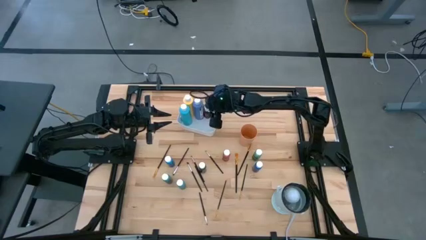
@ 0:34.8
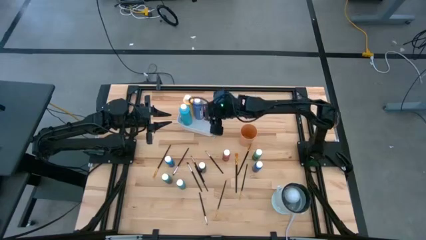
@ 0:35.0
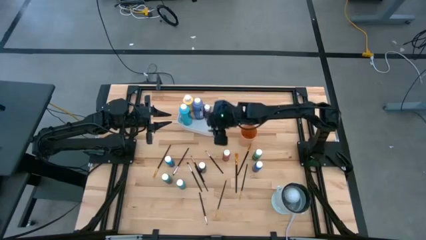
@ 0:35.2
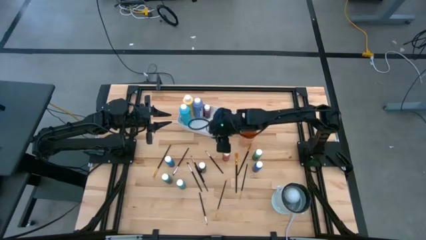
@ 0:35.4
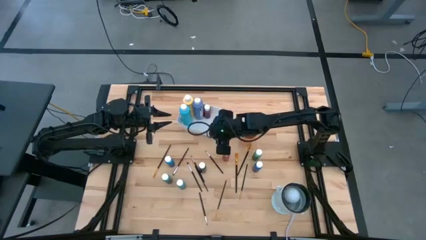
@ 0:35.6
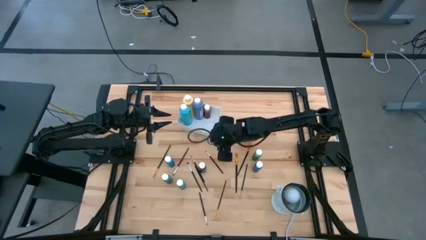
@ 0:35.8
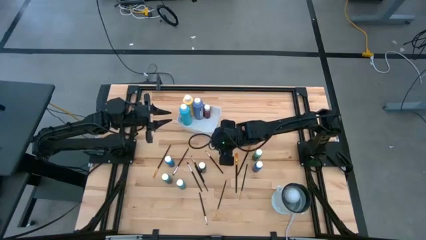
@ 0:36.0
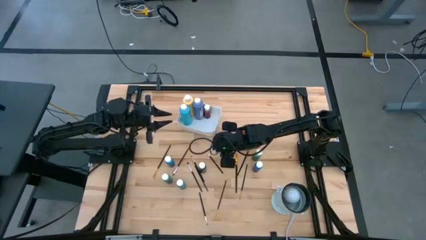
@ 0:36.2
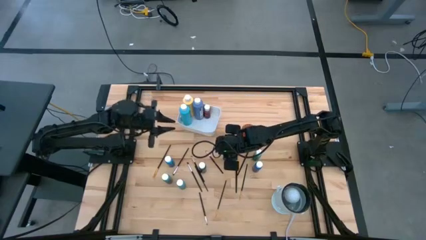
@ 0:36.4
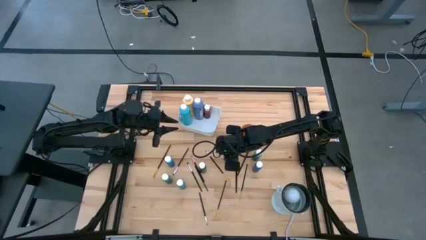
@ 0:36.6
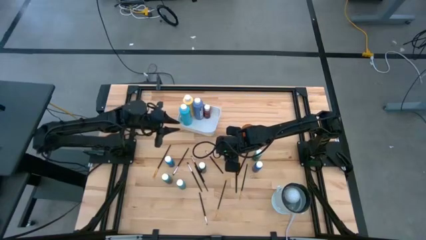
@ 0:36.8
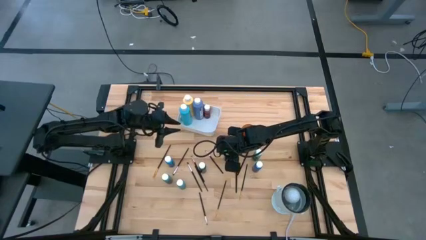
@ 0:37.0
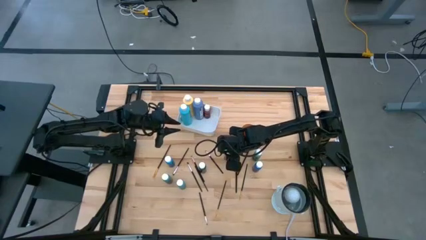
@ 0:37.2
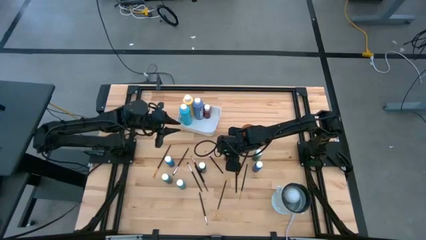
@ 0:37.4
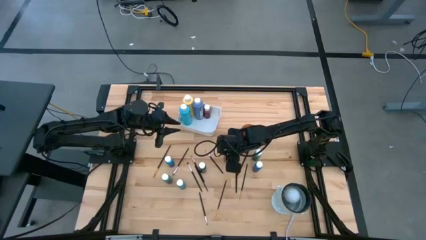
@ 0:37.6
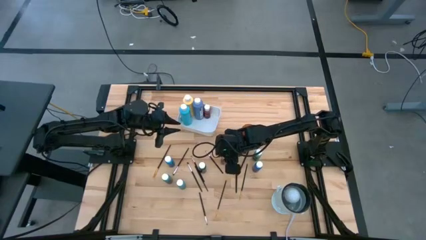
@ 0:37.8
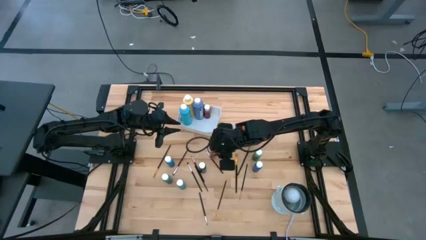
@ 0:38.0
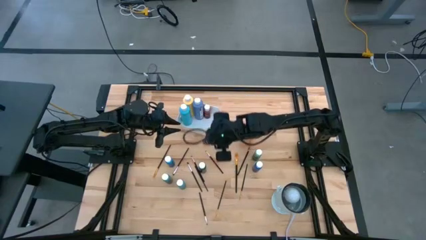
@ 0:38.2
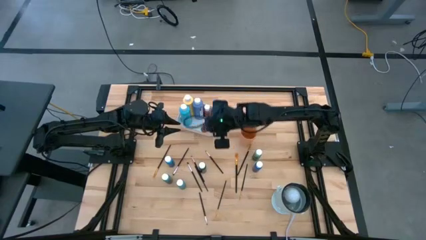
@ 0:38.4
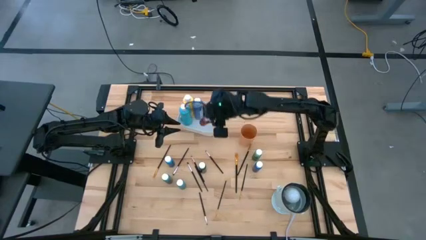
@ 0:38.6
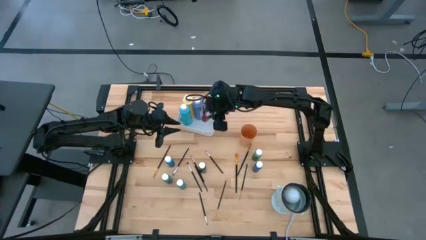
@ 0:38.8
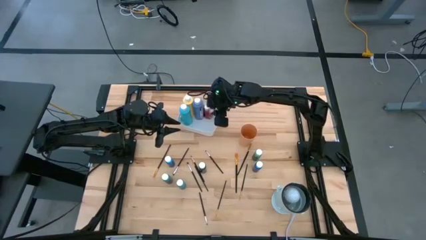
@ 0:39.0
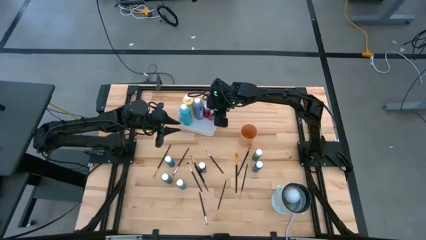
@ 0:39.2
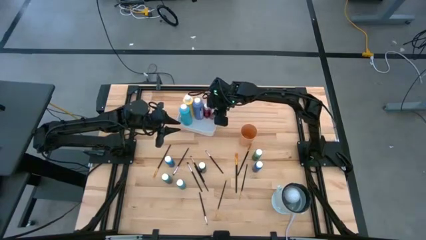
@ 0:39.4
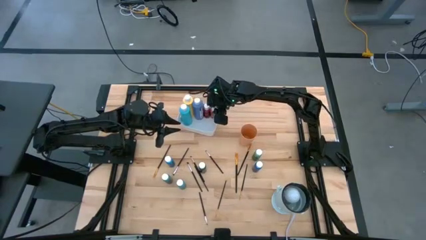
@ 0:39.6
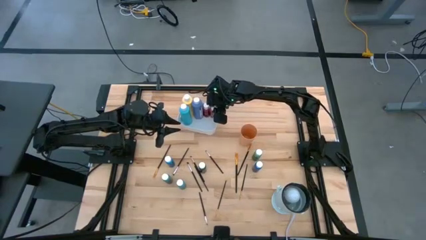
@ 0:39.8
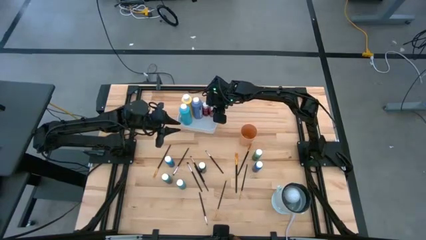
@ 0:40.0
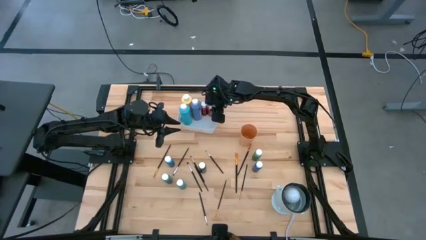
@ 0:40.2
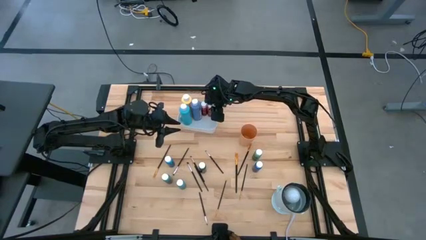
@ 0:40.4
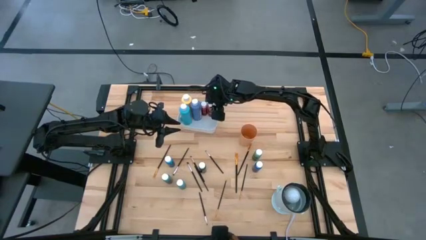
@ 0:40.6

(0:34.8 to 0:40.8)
Task: Pick & Place Paint Supplies
Put the small orange paint bottle into the bin

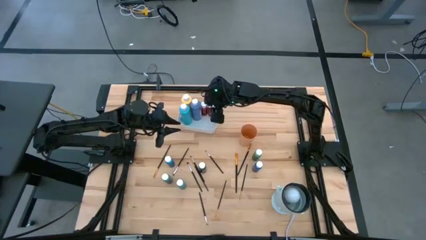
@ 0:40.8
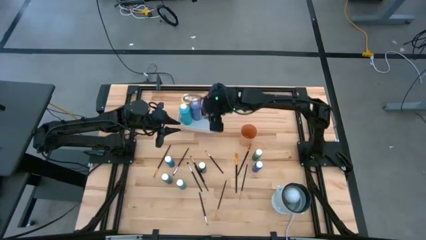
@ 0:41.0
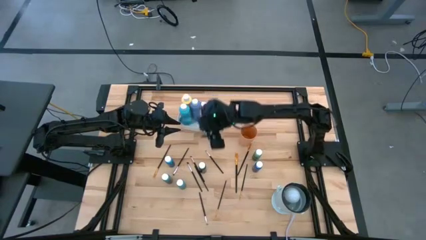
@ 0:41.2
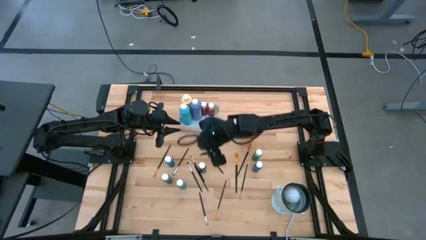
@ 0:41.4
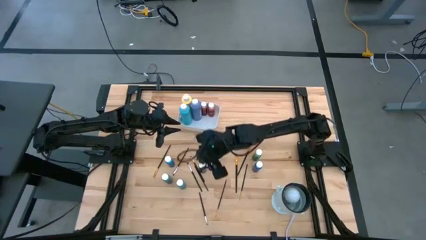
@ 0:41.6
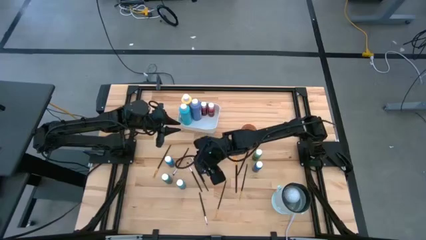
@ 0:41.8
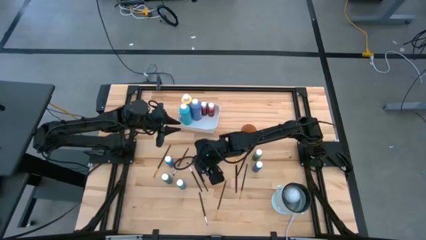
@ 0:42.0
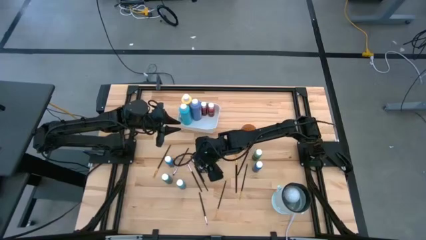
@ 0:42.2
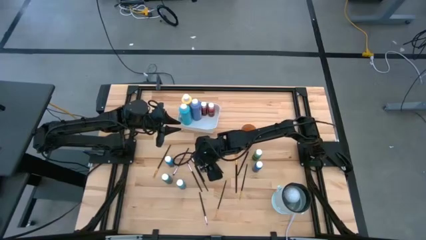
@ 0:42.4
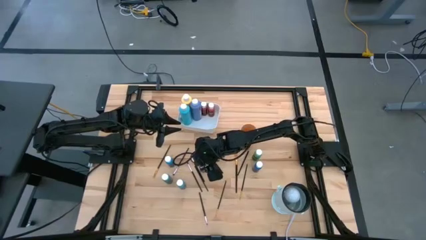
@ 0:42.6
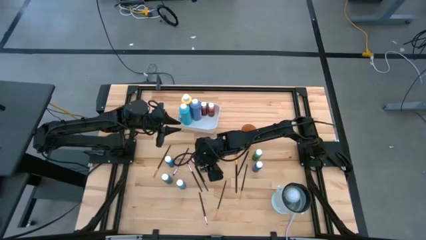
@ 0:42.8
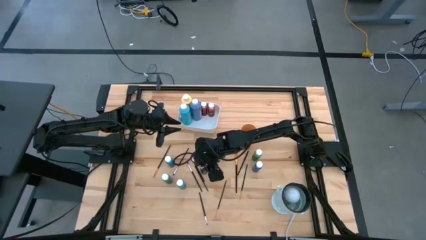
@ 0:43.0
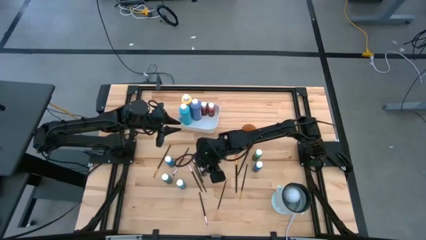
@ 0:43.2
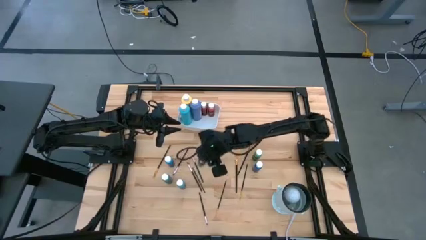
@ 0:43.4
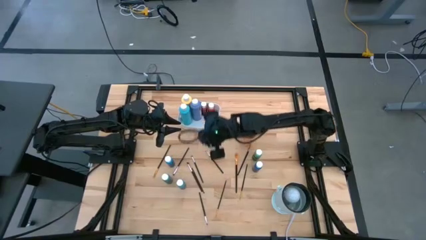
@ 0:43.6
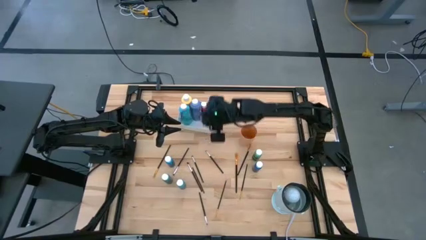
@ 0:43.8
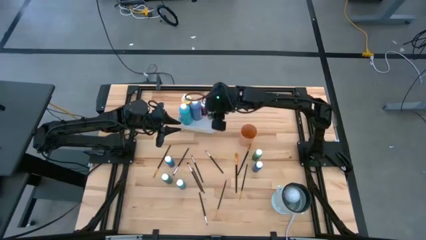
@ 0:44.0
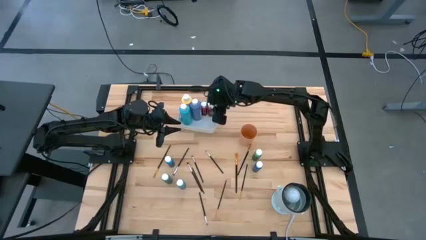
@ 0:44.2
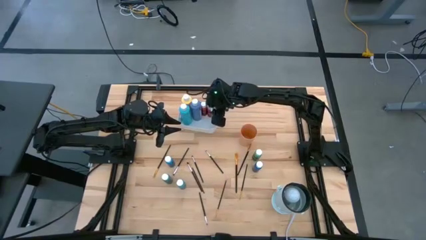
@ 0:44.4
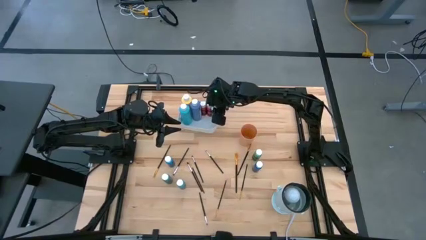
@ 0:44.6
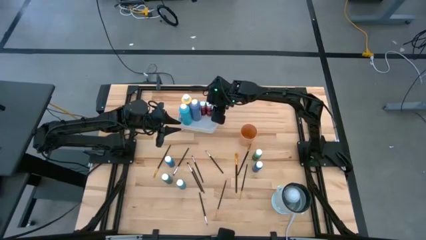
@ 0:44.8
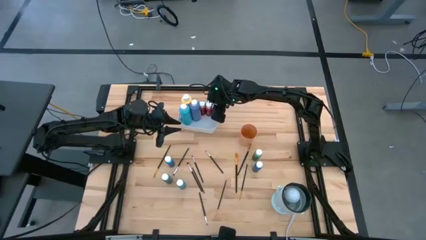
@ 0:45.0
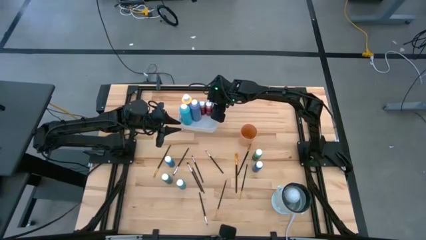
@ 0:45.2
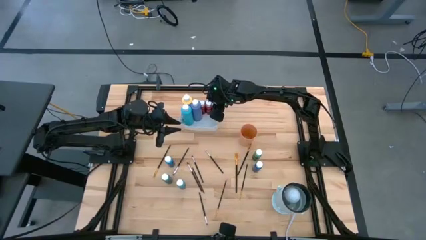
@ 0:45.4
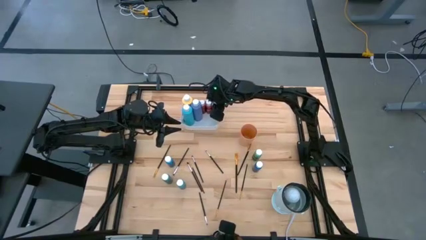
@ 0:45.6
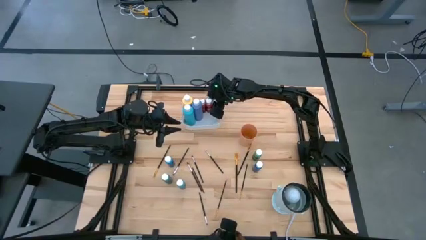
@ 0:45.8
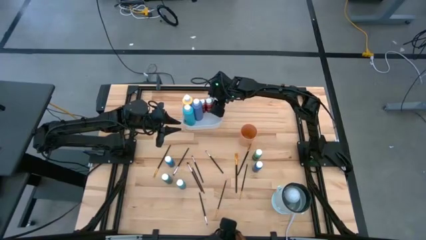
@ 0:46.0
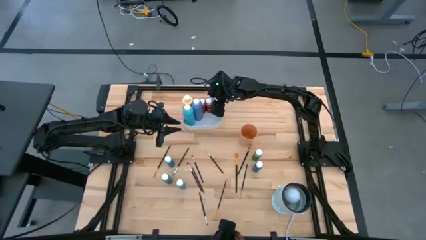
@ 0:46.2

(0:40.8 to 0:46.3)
Put the small black paint bottle into the bin

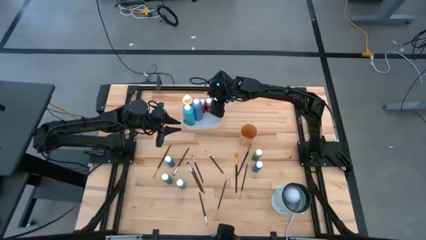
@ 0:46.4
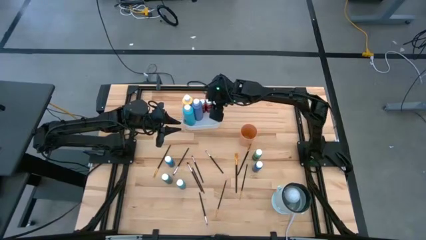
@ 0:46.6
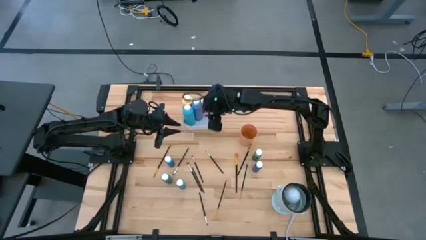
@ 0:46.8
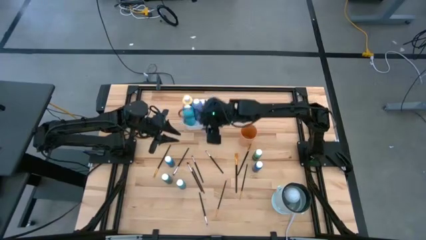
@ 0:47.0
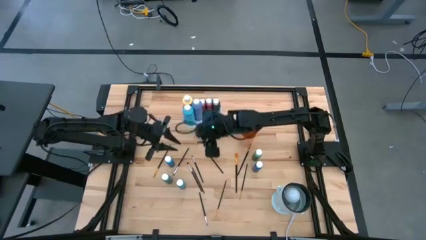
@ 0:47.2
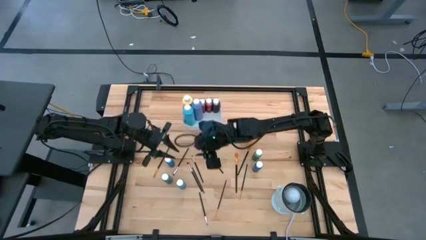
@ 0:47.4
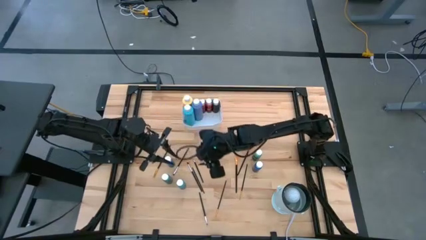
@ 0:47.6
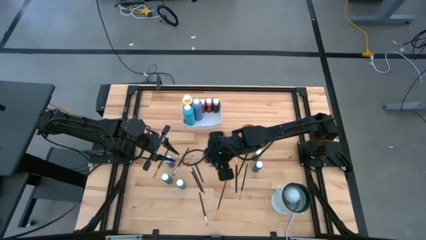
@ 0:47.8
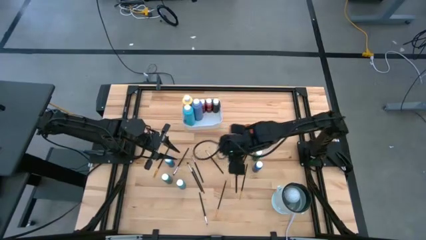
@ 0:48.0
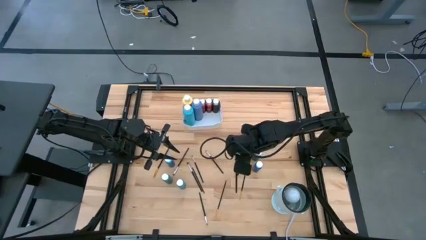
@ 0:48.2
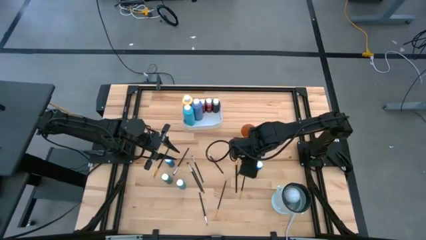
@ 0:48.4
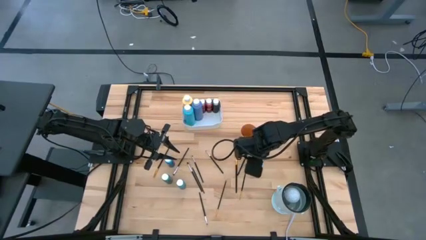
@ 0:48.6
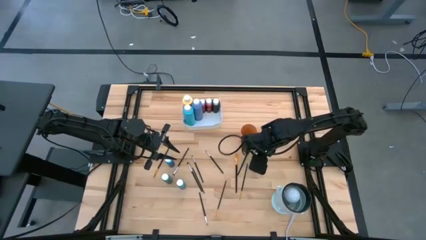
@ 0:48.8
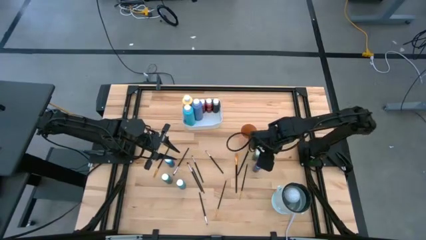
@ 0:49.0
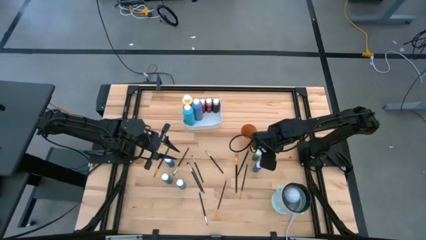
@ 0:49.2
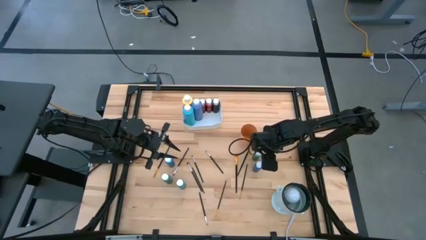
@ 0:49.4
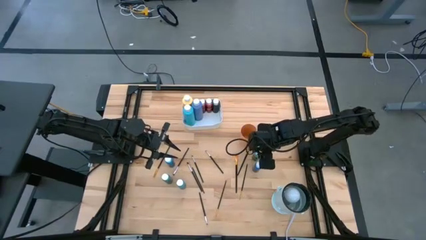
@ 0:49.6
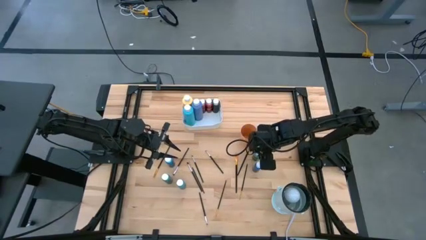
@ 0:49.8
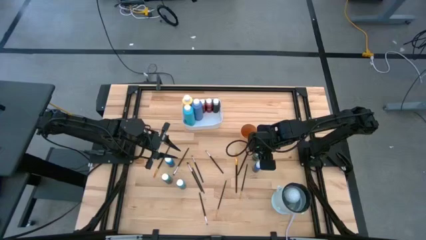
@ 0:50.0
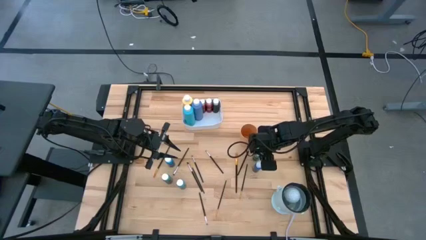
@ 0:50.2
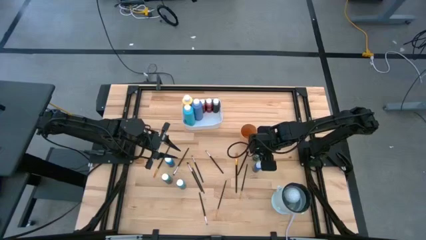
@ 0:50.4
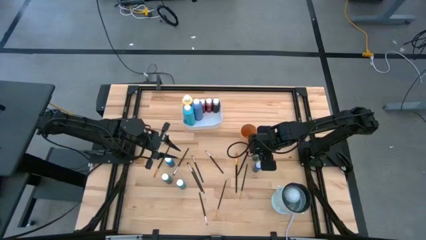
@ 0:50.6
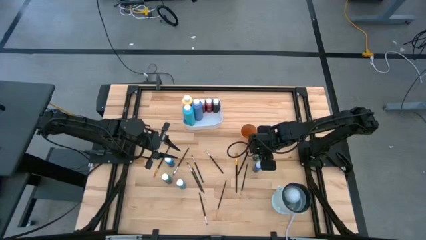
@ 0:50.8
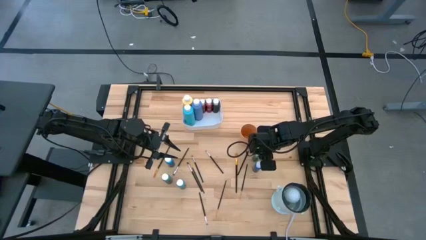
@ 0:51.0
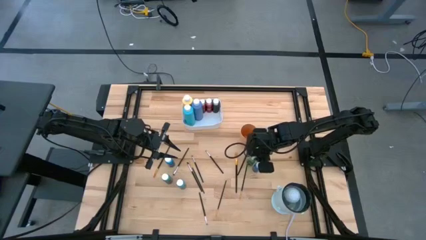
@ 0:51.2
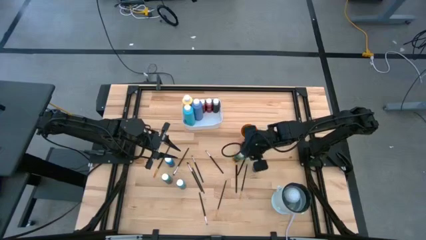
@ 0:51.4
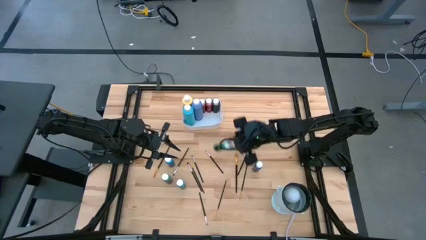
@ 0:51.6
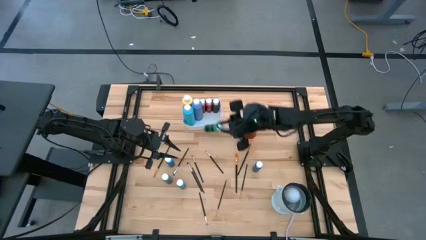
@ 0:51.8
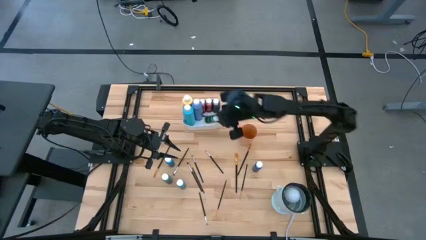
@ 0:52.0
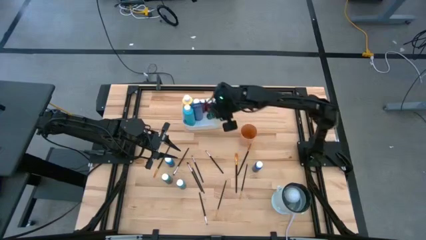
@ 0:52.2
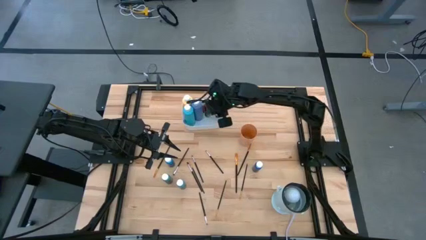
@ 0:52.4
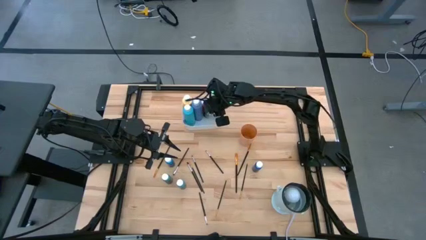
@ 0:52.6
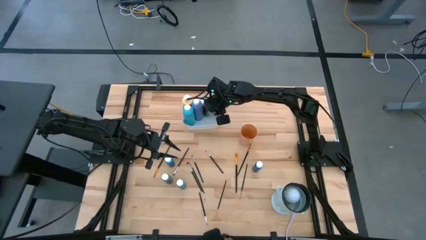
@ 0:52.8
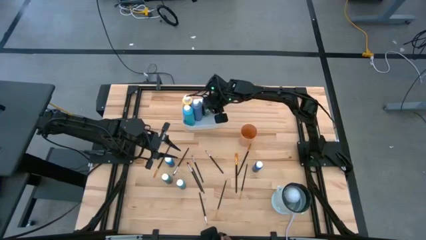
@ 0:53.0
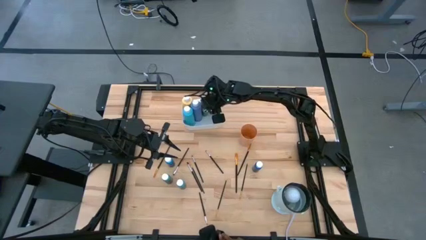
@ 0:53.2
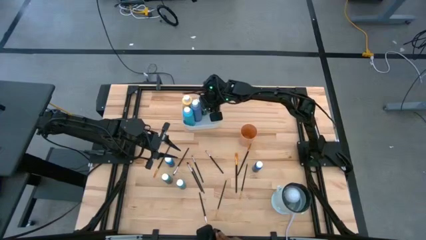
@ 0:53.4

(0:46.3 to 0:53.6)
Put the small light green paint bottle into the bin
